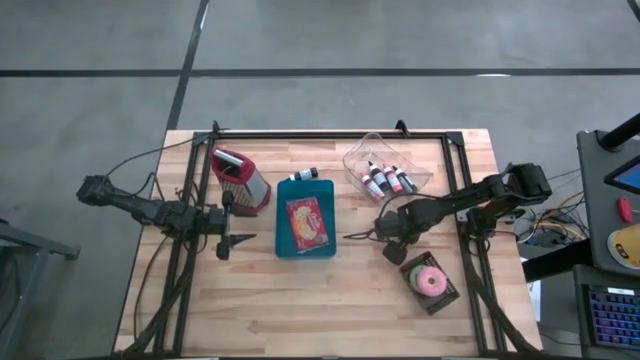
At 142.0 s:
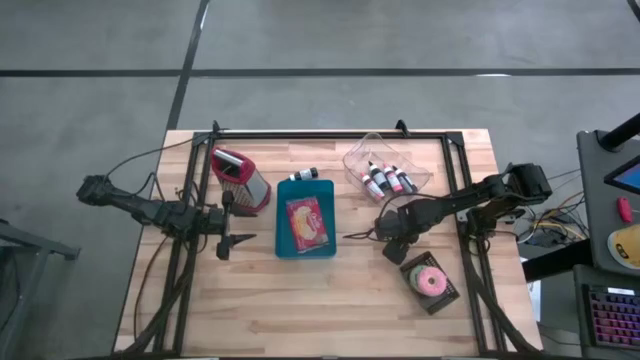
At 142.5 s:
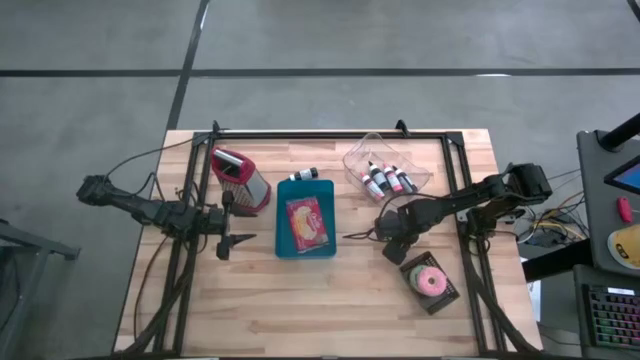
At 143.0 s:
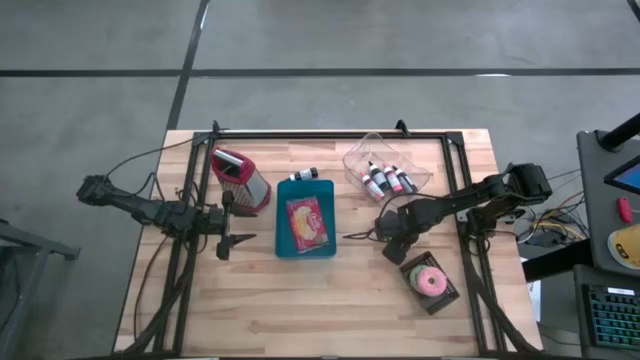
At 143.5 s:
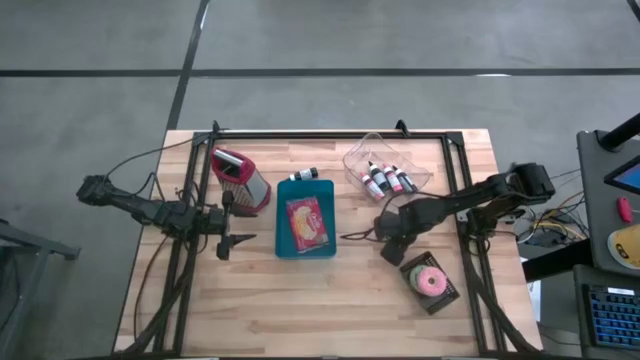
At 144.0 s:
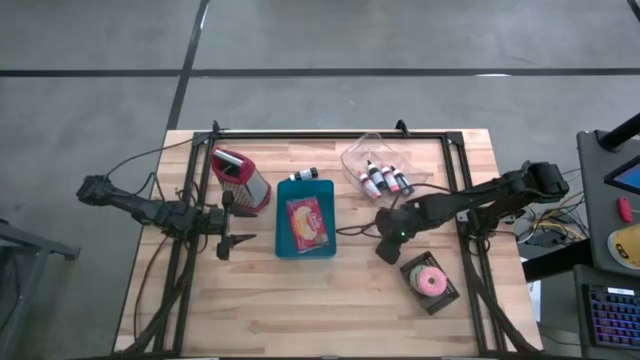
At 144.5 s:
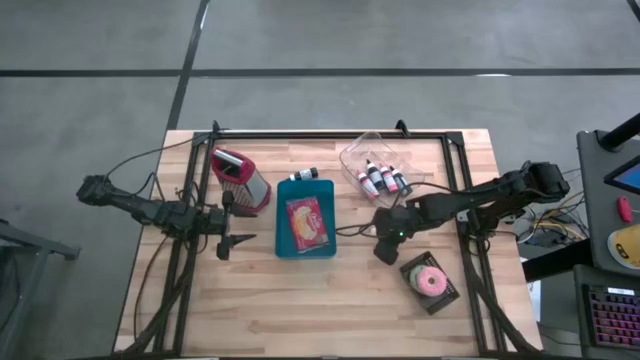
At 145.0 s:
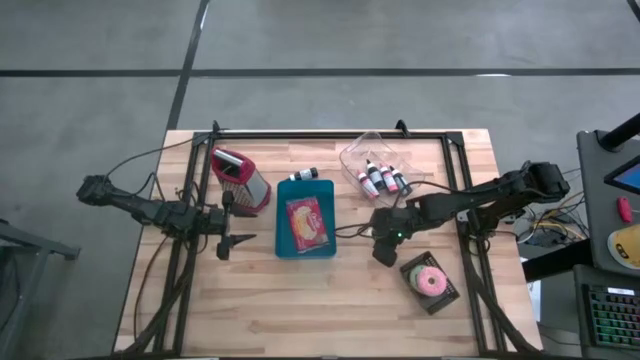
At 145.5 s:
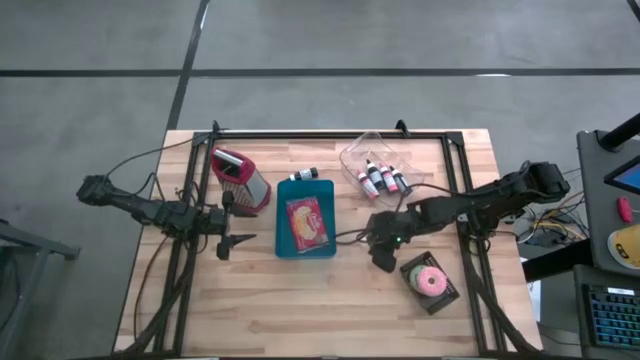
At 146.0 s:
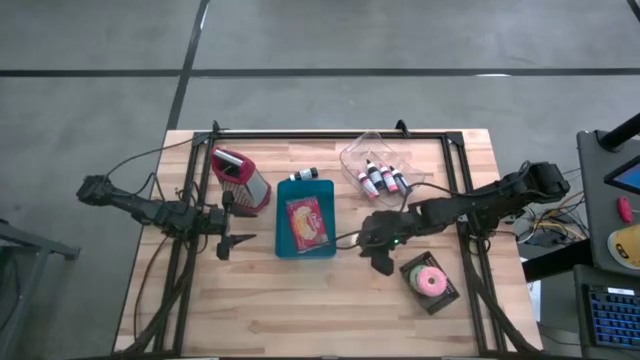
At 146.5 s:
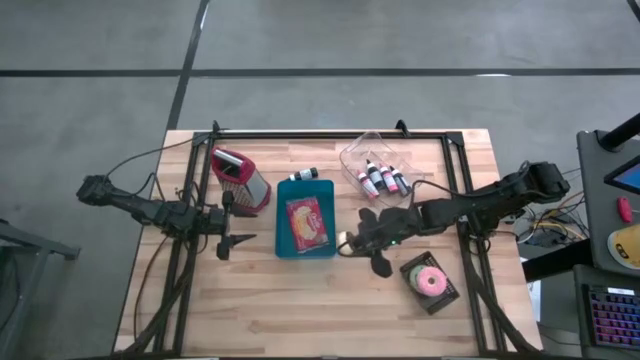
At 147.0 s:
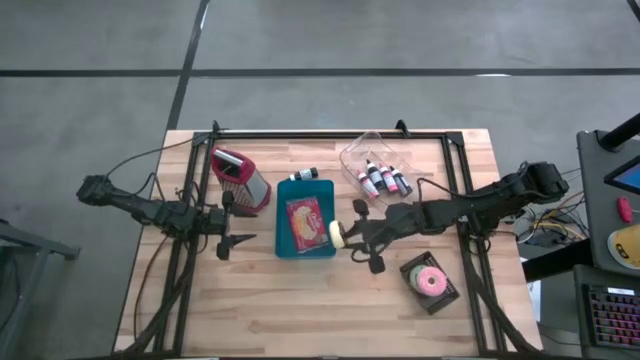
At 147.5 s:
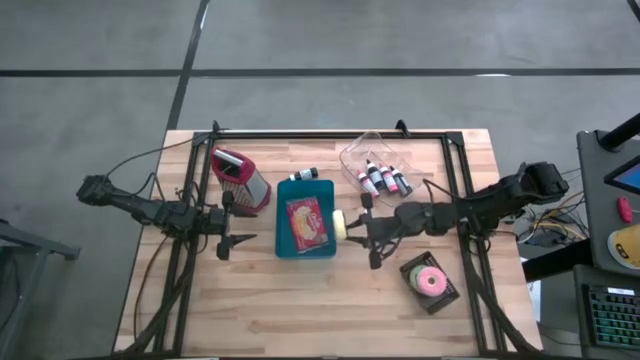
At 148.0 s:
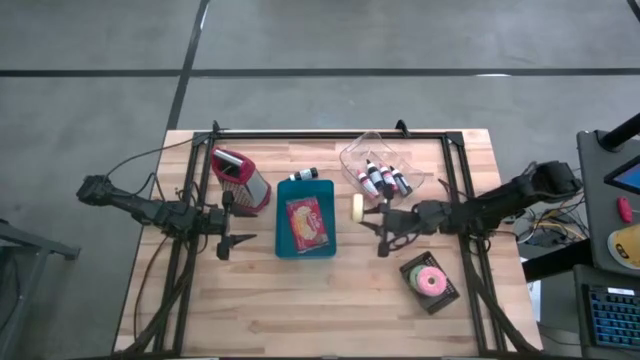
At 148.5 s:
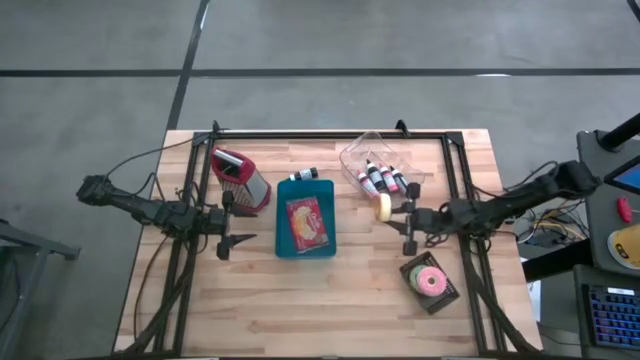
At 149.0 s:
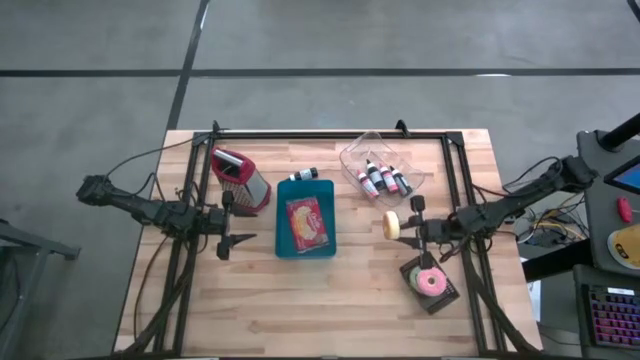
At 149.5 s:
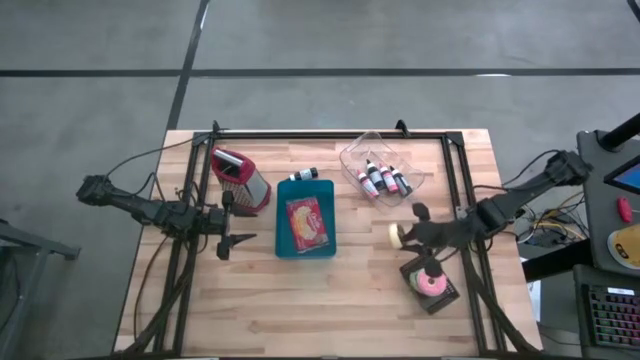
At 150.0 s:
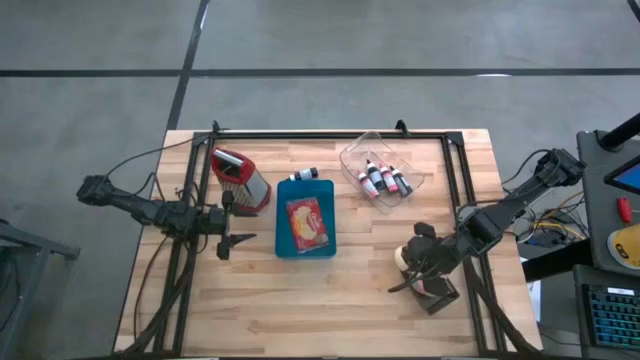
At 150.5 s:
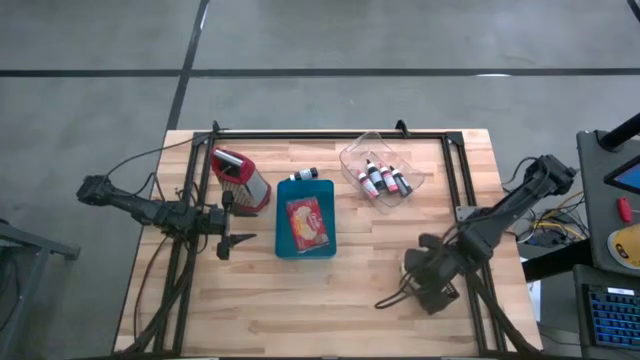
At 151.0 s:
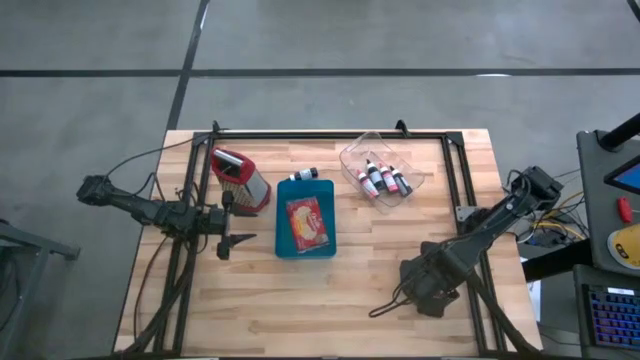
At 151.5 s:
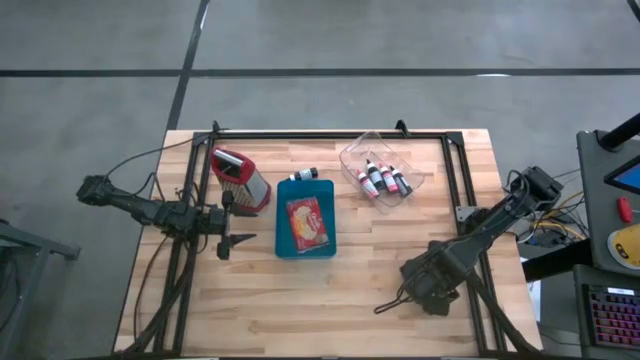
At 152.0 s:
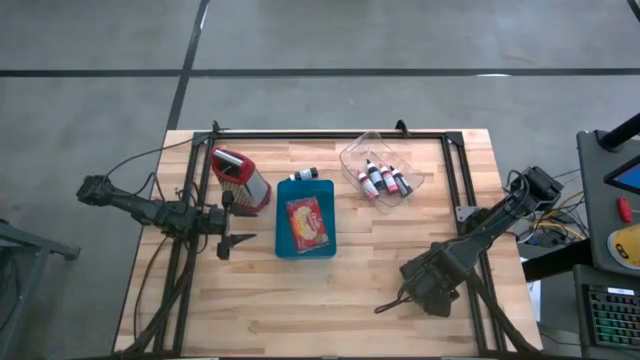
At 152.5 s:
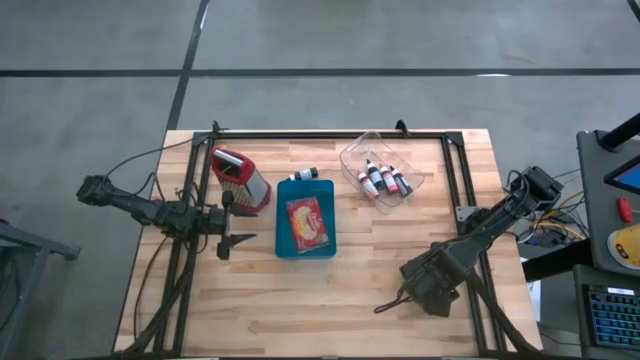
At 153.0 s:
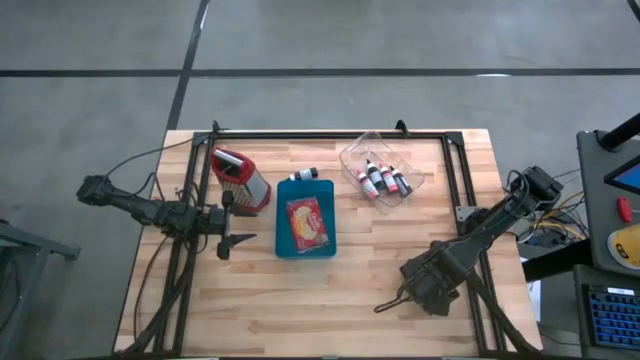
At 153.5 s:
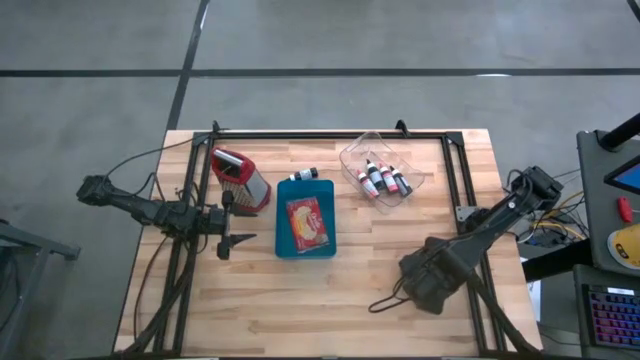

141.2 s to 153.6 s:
Task: Pick & Place Food Item
Put the black donut into the black bin

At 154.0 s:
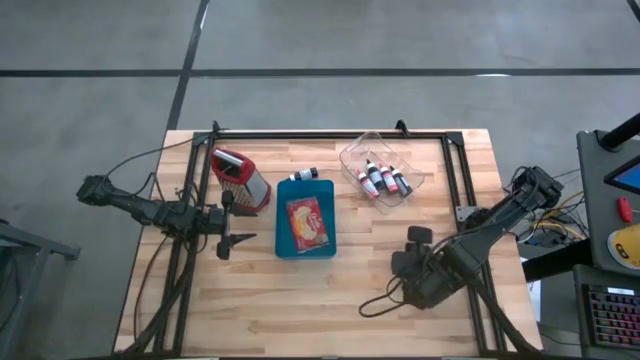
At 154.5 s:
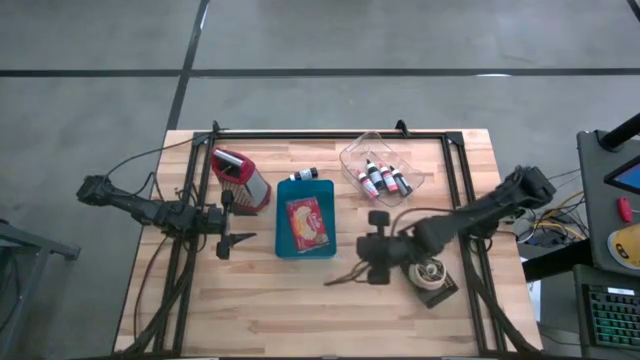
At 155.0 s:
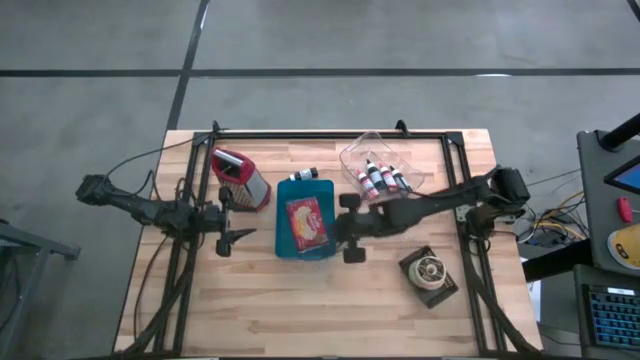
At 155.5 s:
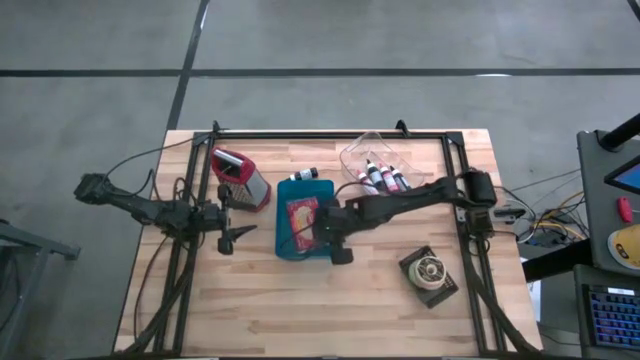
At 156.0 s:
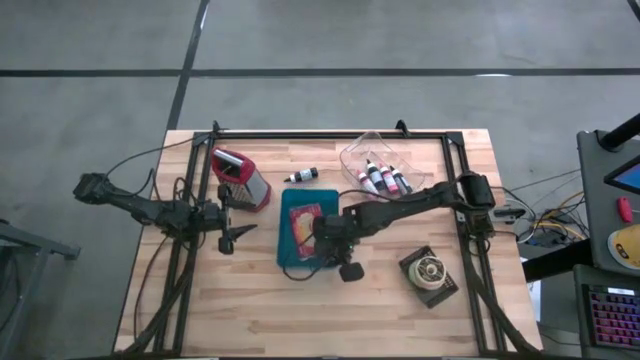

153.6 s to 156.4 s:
Adjust the blue bin

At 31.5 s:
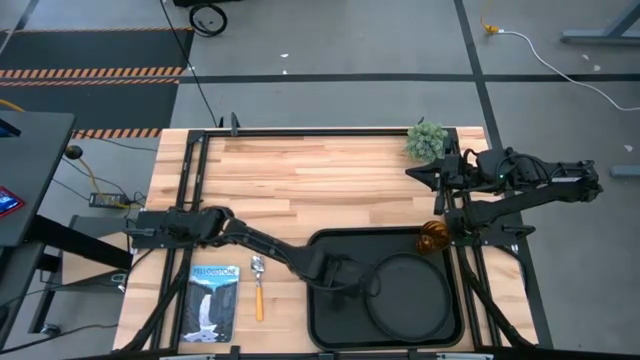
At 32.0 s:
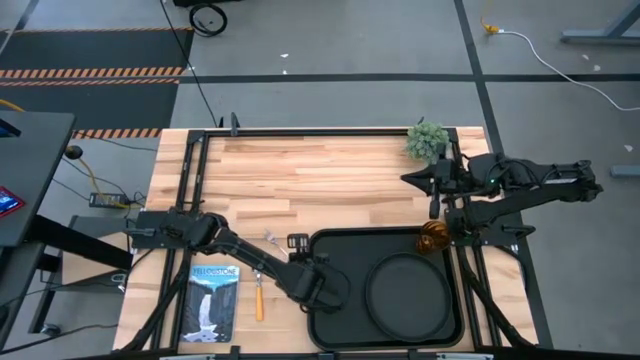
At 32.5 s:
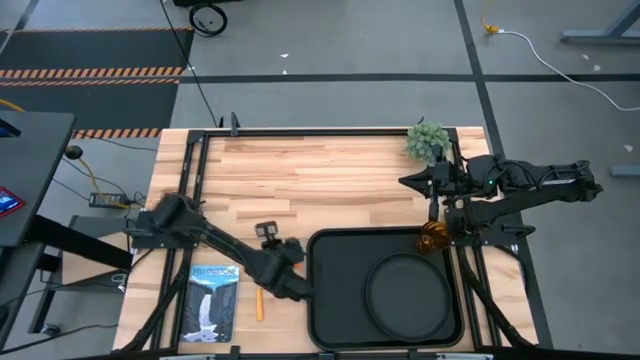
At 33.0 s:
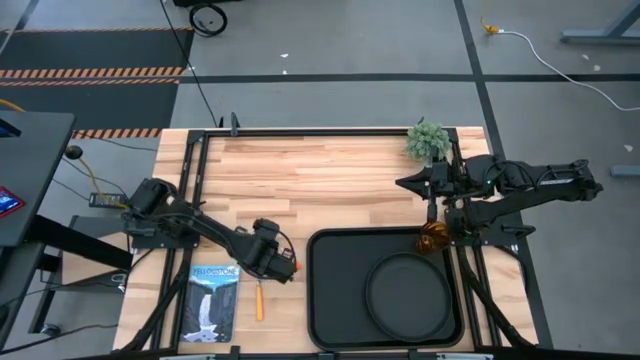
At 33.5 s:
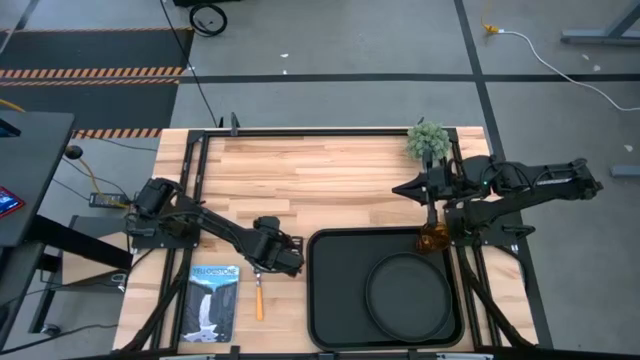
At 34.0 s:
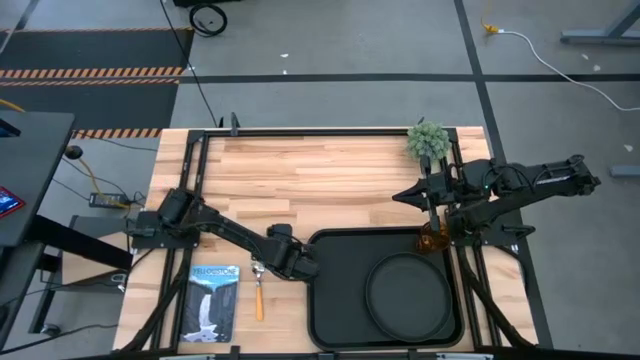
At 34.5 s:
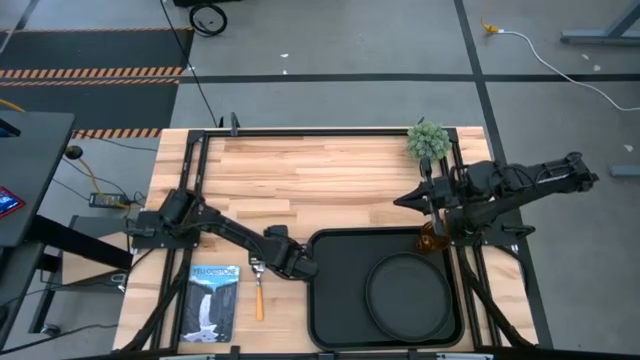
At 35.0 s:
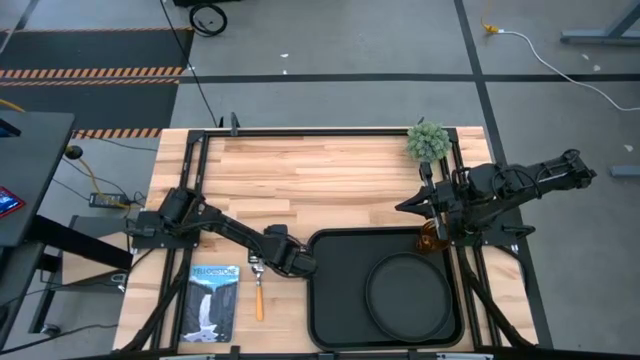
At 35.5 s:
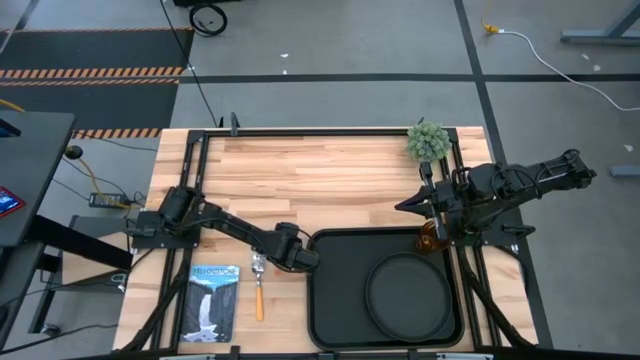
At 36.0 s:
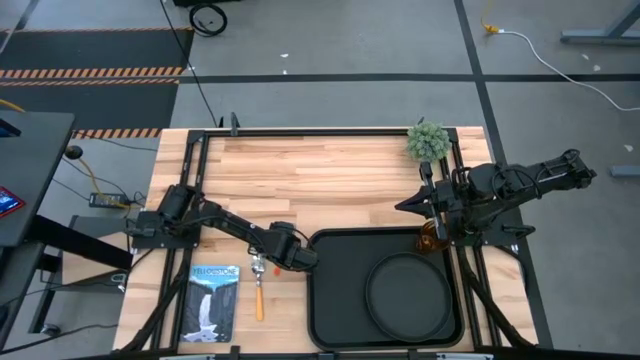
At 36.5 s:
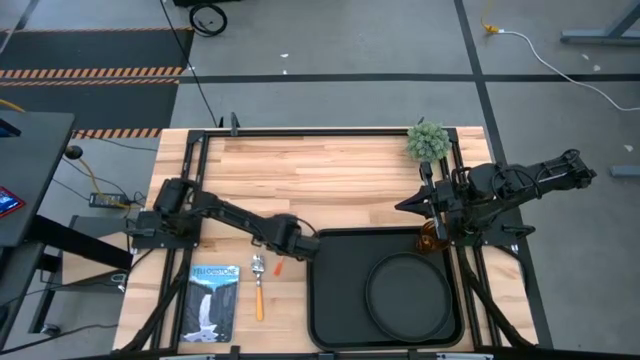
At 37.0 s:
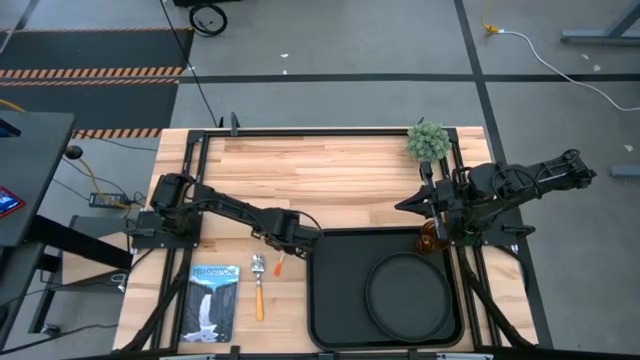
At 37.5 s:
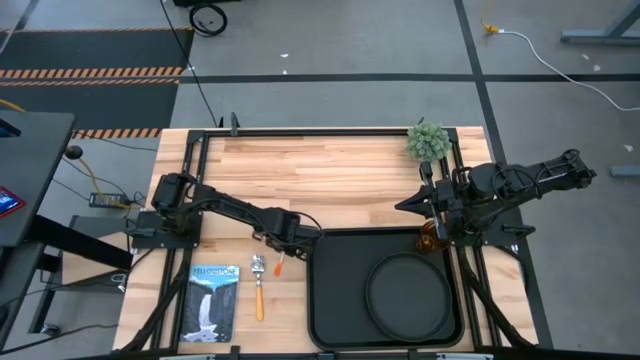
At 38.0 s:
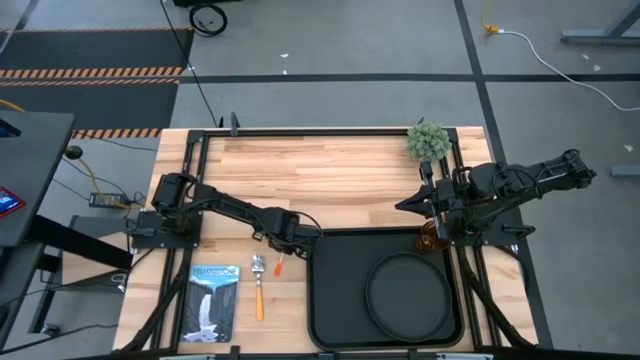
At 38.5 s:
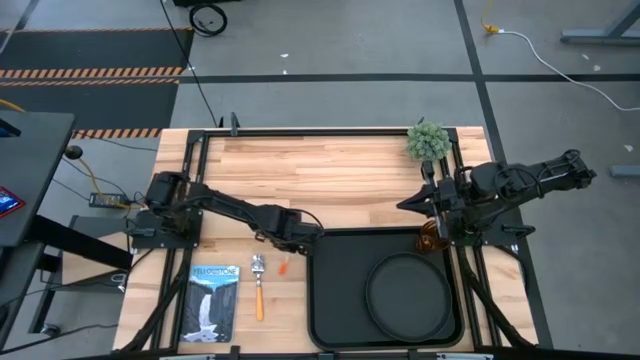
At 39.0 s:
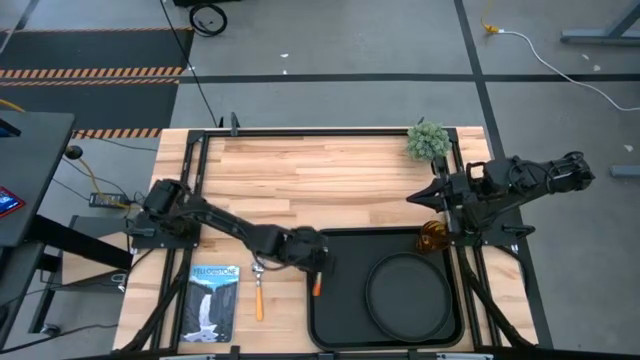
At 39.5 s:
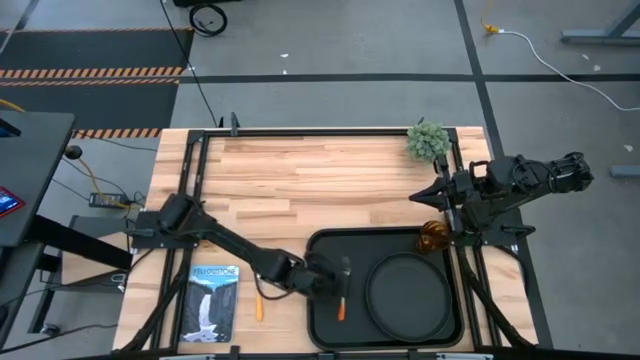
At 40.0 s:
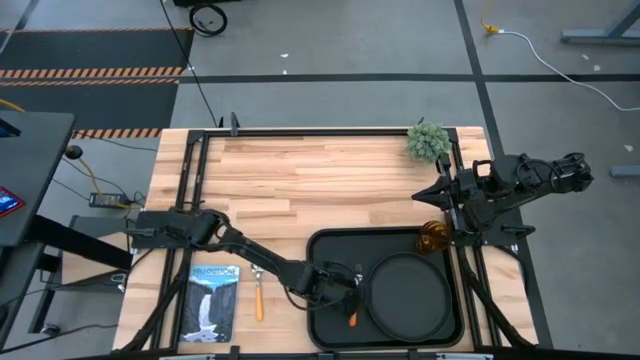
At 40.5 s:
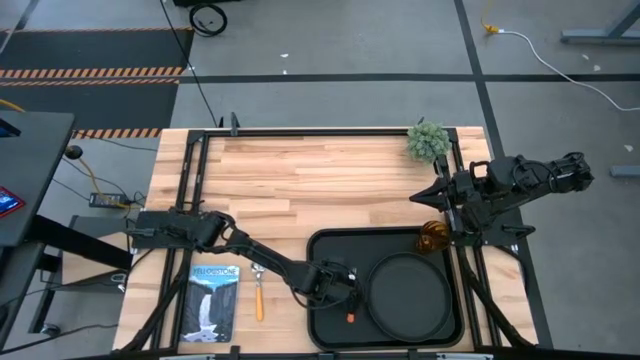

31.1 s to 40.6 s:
Task: Pick and place plate/cup/fork/spoon on tray
Put the orange fork on the black serving tray to the left of the black plate
